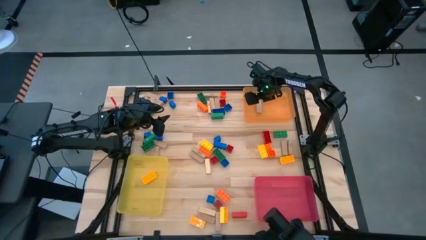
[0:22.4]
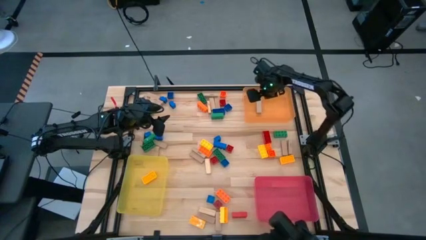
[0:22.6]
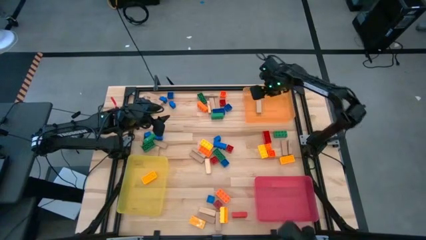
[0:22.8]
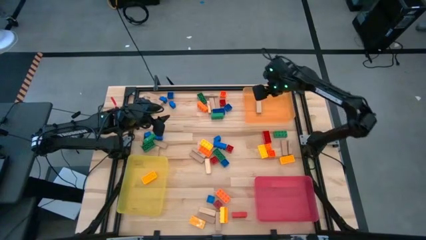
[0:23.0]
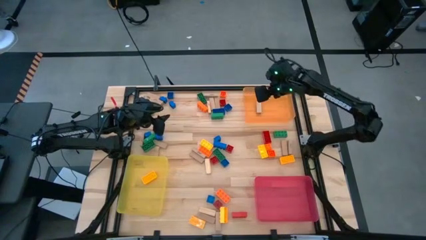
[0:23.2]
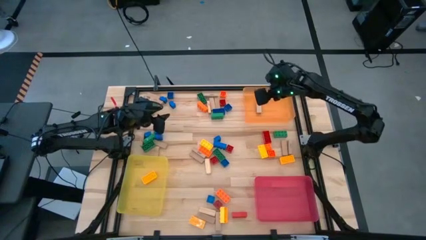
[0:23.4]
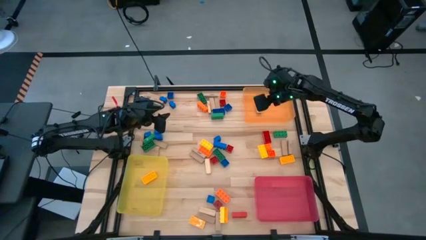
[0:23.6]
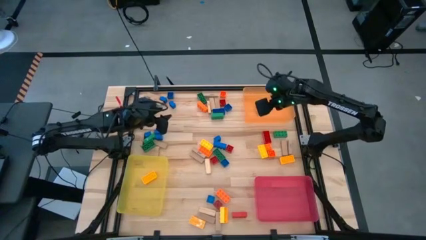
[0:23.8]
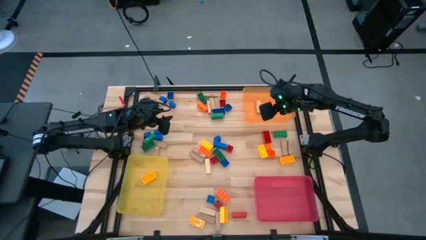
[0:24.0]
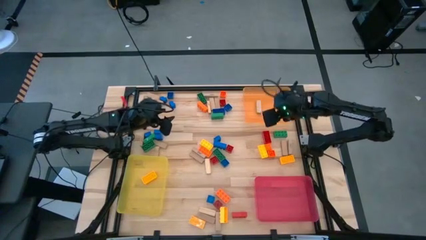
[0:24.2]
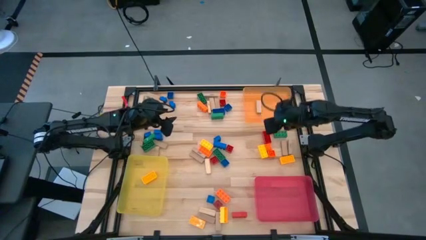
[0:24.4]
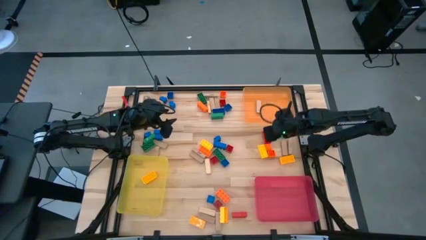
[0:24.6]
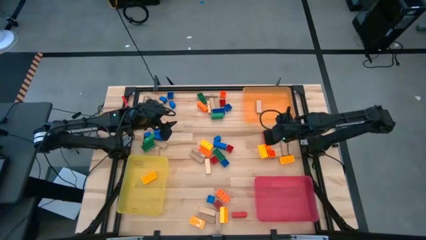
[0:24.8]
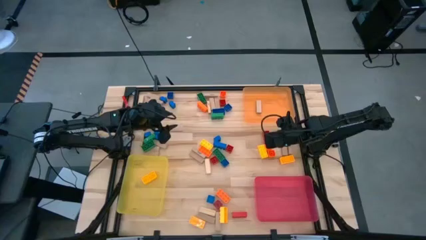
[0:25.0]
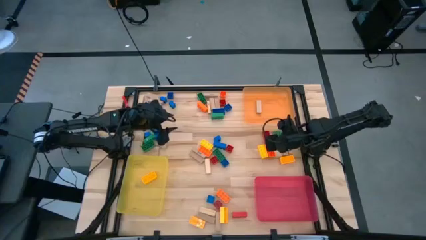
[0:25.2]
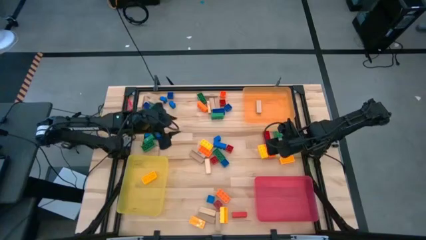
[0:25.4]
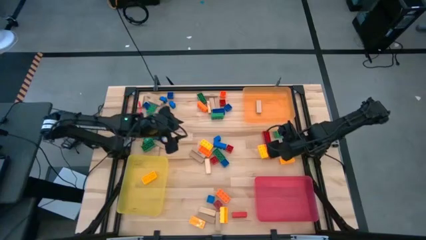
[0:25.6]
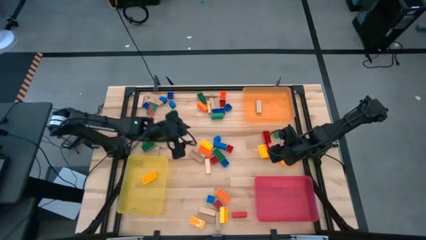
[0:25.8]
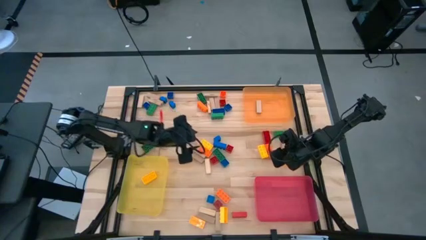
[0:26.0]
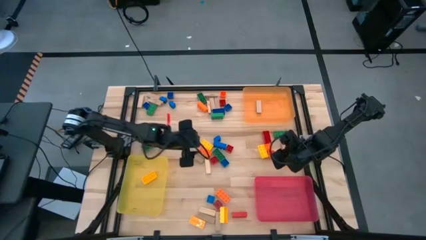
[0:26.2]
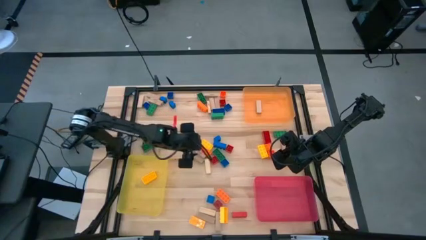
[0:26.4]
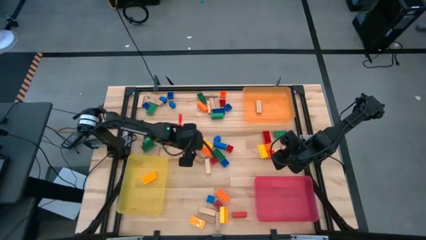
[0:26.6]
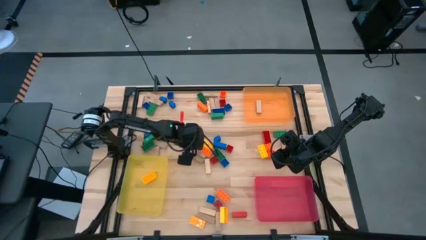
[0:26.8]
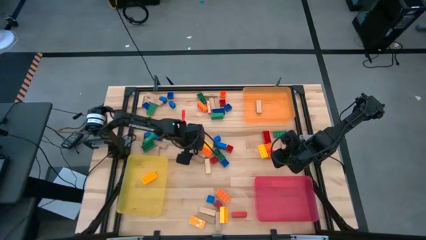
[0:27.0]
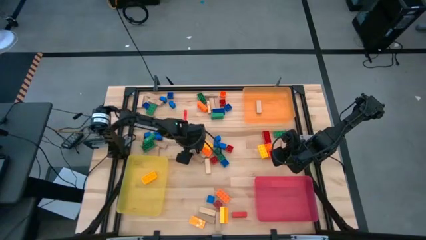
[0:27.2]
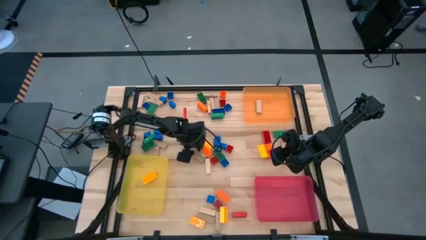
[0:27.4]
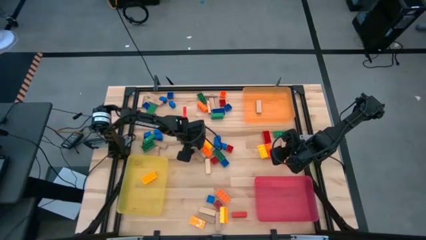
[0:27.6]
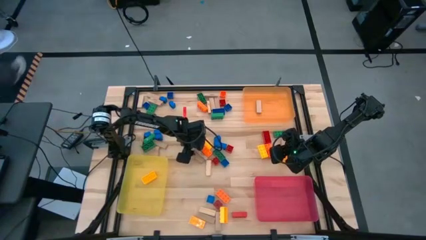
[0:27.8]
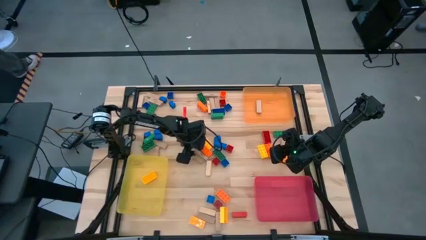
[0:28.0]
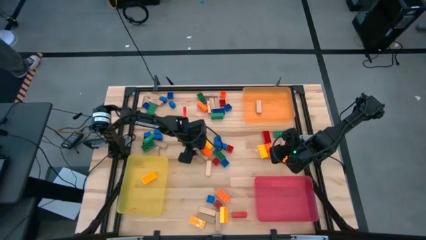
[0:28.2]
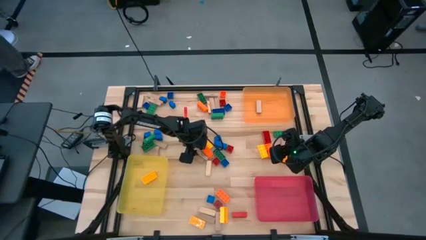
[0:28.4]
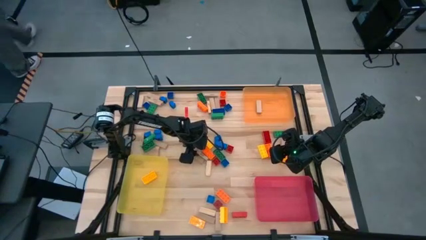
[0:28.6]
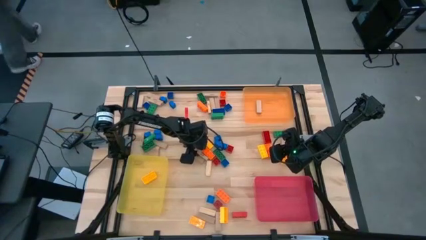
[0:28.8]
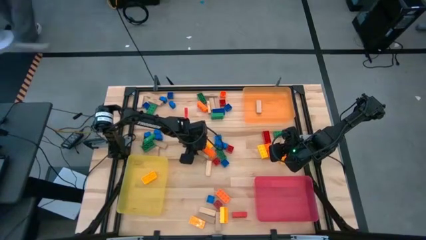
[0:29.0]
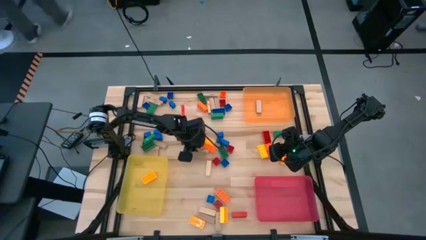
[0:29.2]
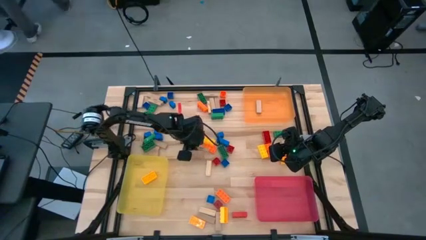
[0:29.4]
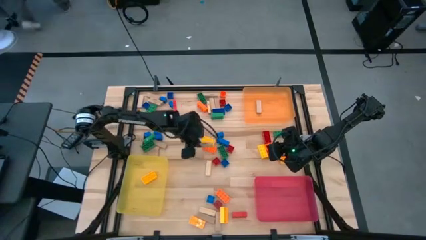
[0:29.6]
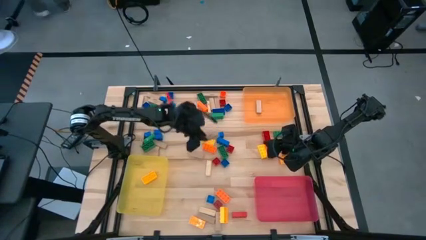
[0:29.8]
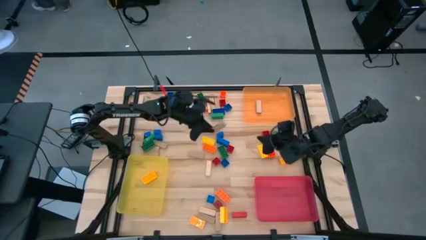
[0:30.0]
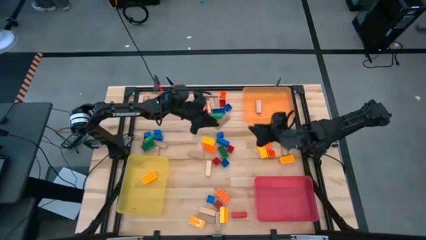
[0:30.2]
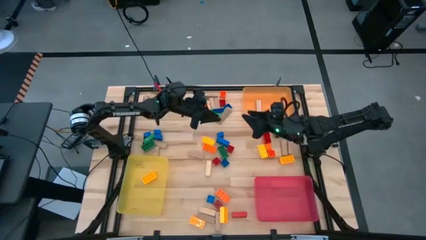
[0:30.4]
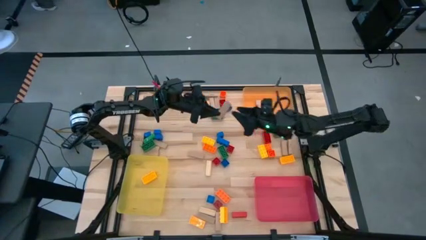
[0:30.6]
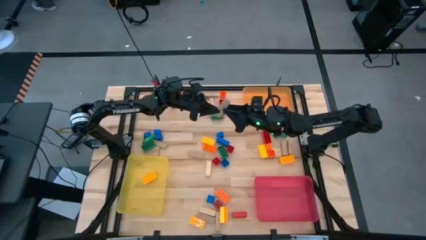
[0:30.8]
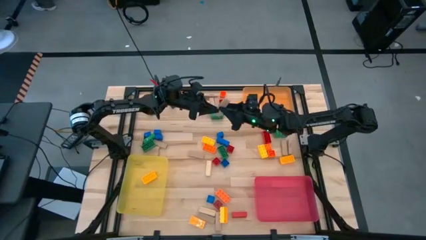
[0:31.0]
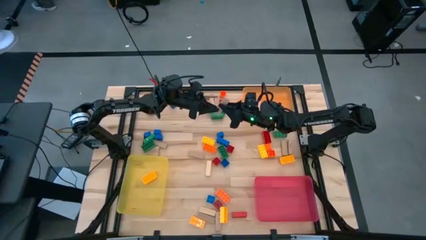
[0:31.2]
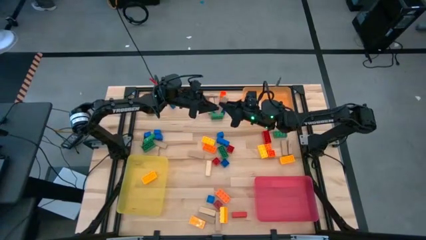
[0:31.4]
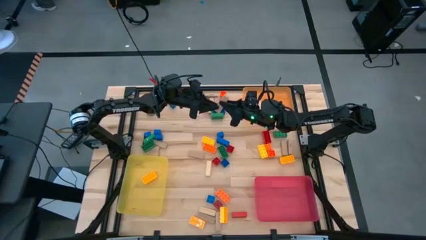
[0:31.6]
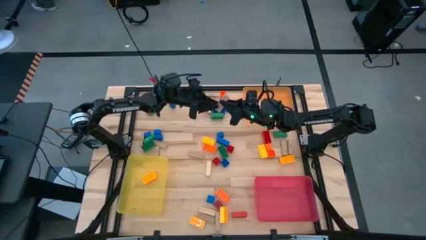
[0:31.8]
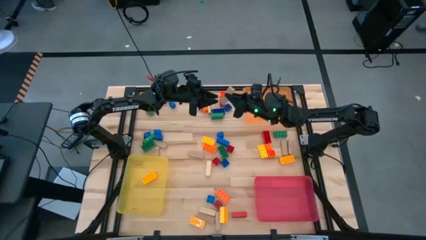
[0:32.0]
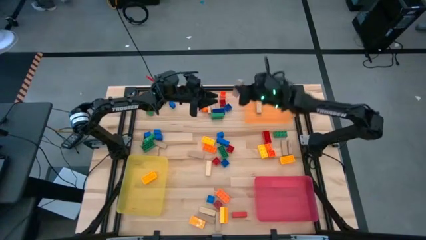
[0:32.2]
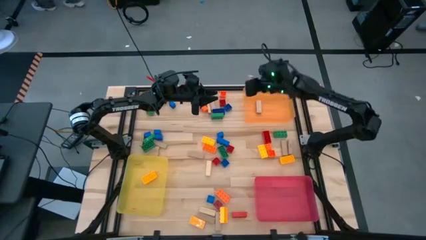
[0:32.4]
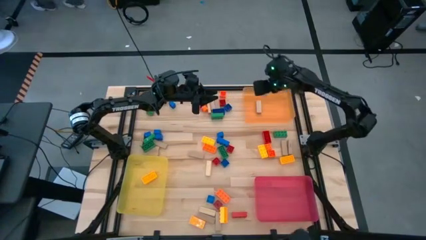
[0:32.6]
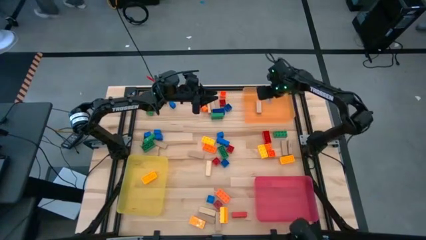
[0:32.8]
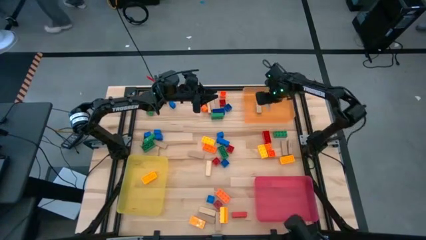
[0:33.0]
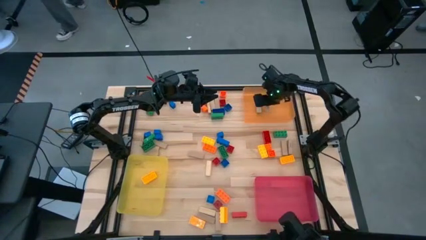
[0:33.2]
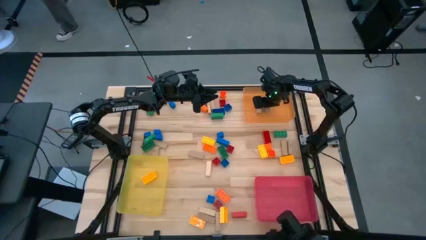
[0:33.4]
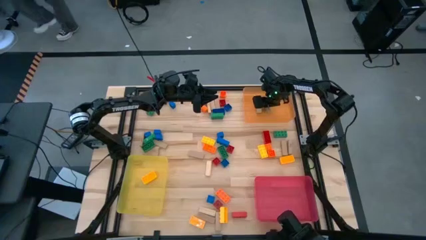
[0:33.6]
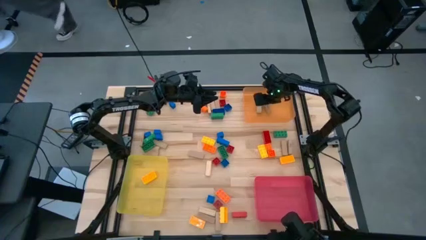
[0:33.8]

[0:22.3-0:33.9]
Task: Sort blocks by size
Put the brown block into the orange bin
